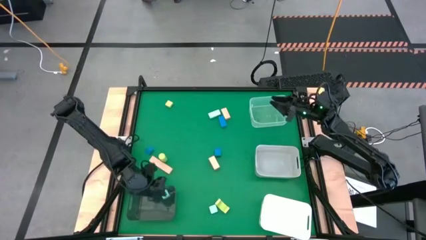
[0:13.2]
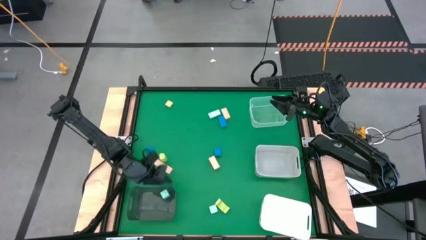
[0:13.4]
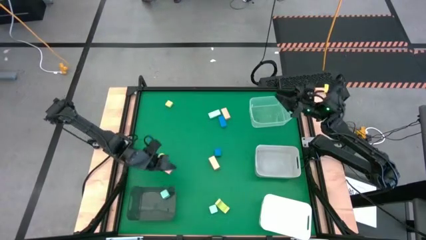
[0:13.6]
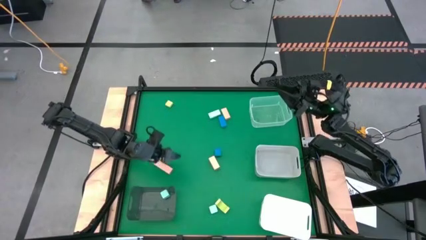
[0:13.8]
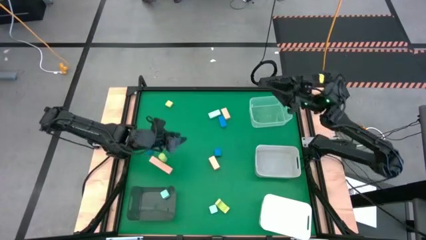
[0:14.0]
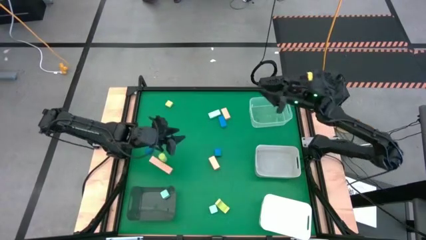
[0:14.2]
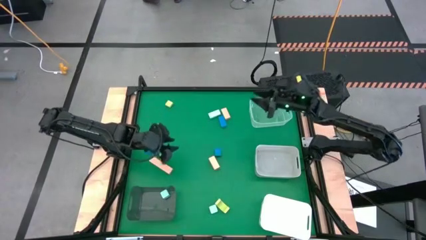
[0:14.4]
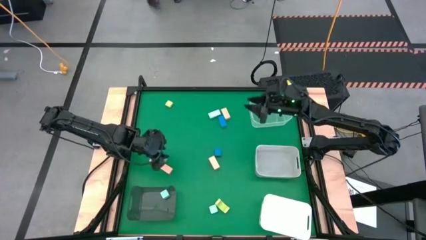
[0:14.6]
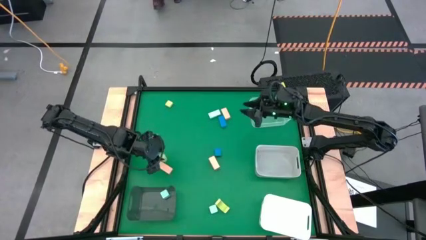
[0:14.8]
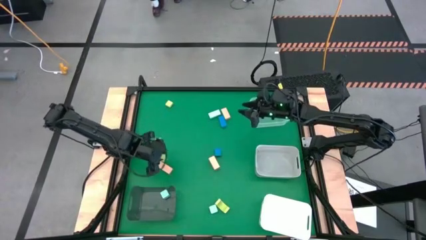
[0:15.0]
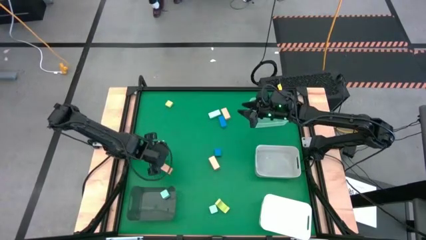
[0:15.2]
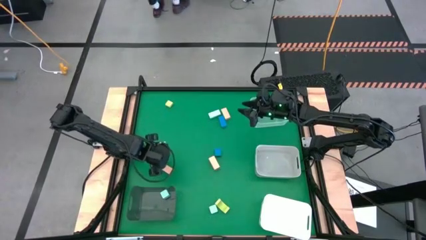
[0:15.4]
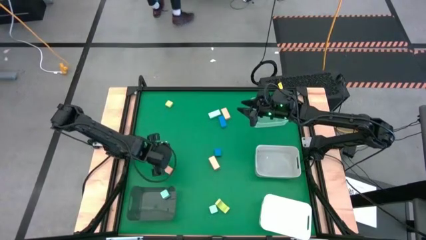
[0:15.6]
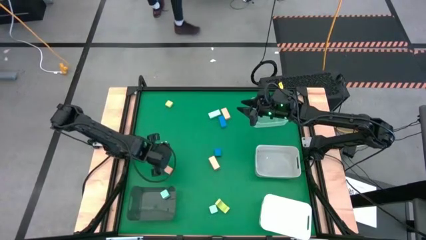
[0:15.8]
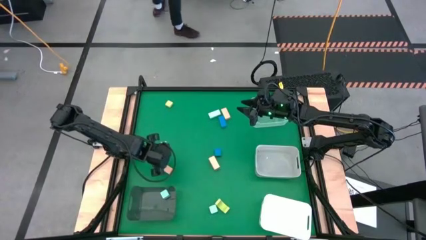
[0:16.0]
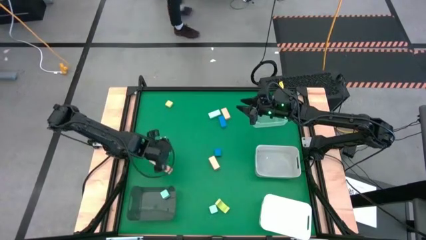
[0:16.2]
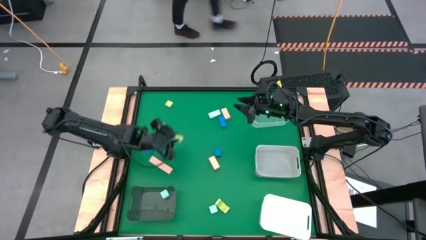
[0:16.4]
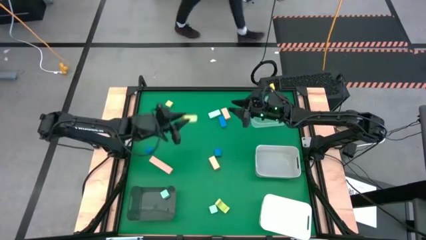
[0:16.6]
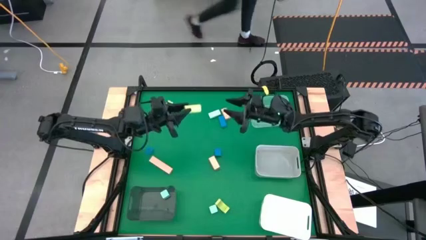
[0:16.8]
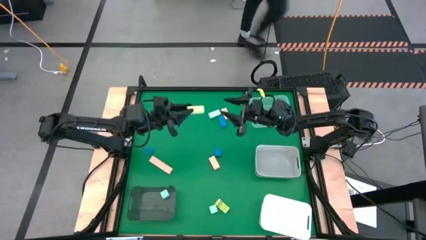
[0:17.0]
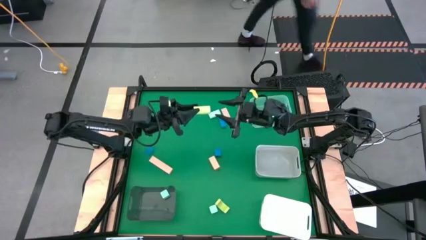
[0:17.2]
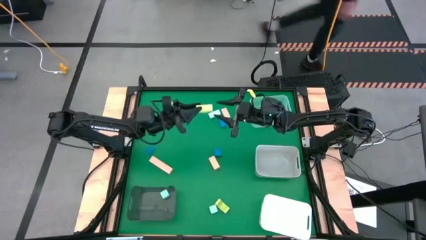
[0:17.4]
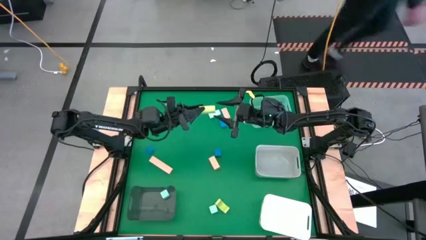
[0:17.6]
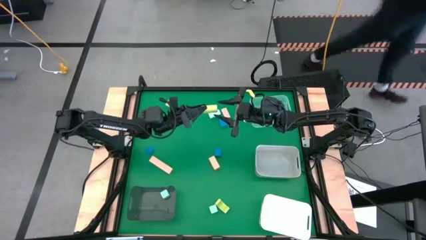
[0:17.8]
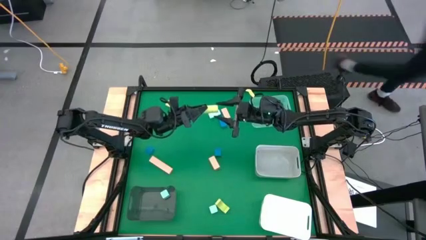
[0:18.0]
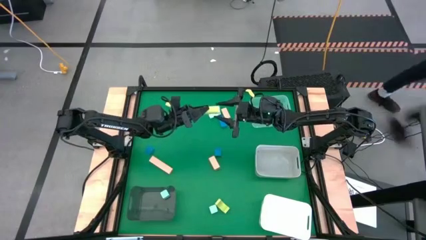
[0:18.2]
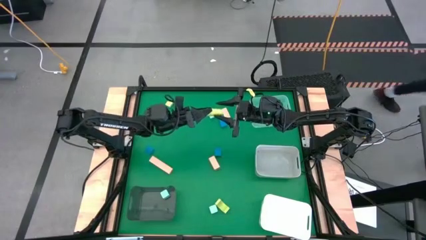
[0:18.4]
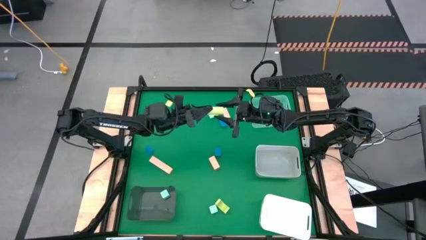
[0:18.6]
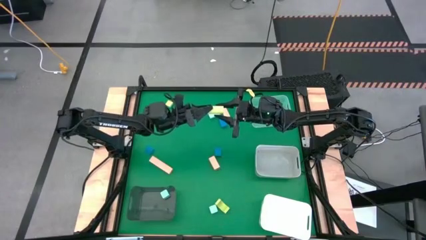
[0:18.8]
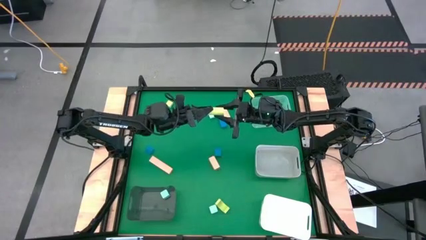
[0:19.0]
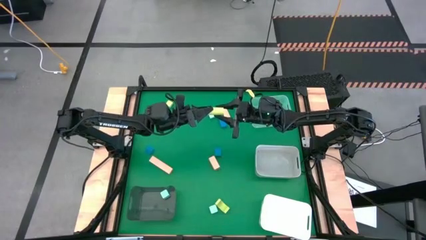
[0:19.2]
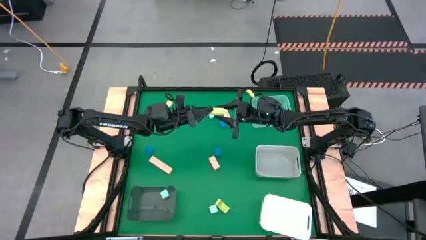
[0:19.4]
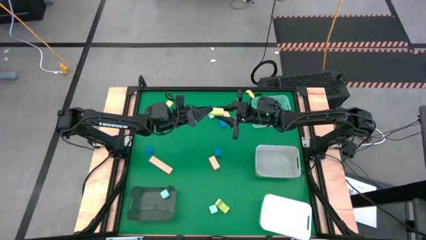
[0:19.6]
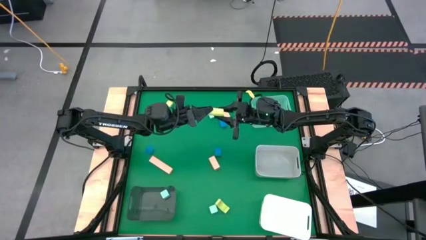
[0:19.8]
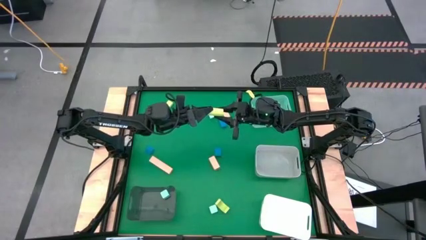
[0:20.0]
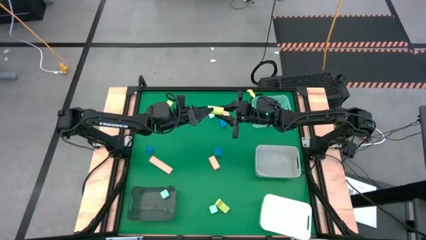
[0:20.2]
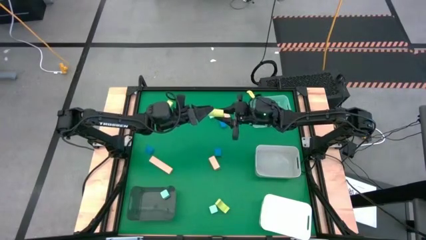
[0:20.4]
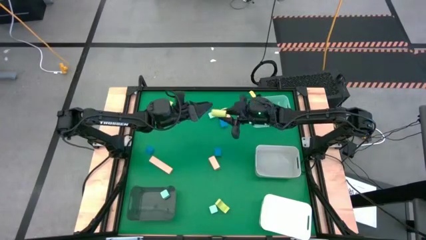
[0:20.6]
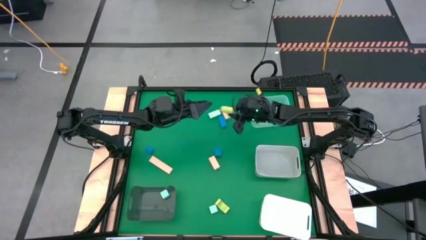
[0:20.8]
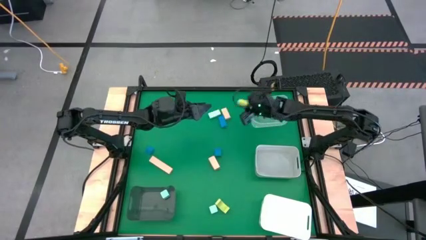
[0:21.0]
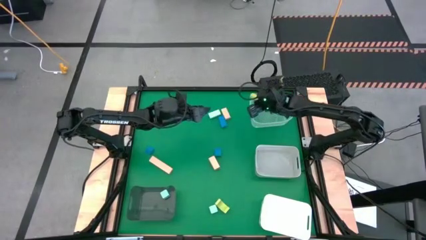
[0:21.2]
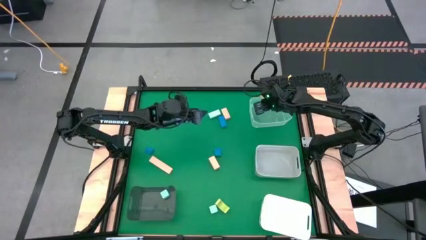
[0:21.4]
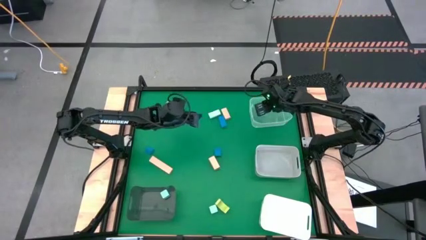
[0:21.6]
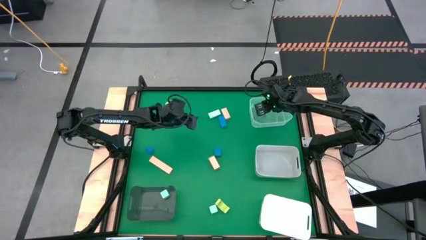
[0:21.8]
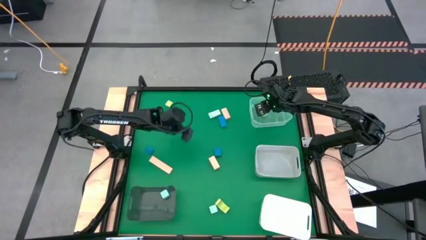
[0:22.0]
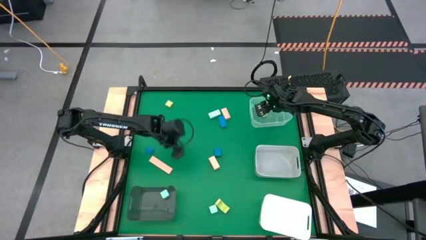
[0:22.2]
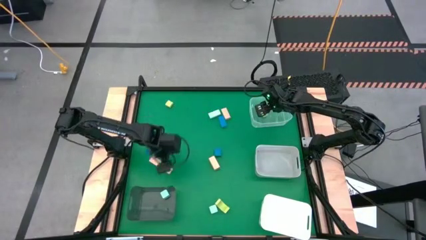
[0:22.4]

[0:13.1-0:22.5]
Task: Sort & place blocks by color
Put the middle left green block into the transparent bin

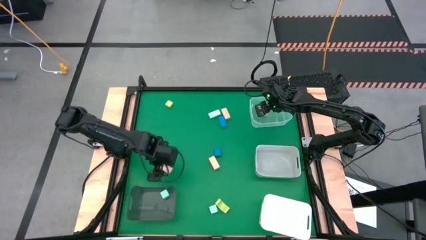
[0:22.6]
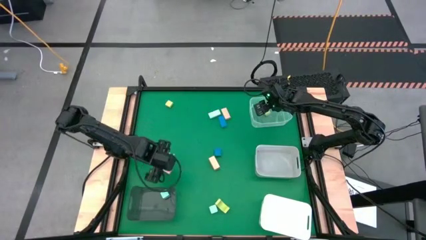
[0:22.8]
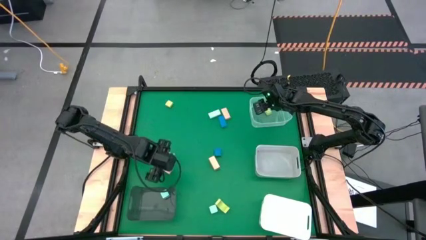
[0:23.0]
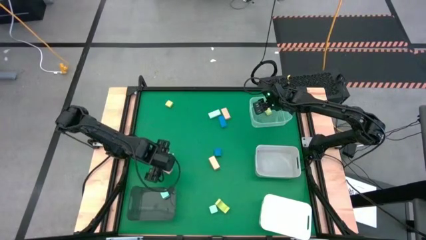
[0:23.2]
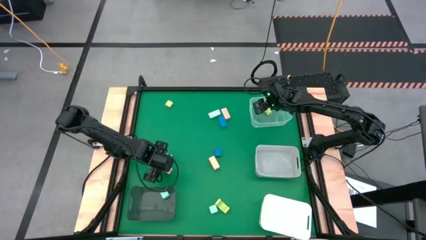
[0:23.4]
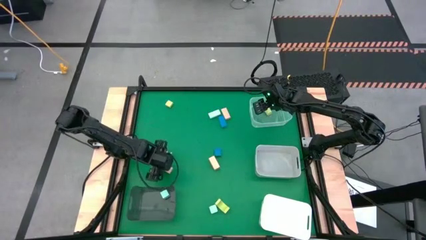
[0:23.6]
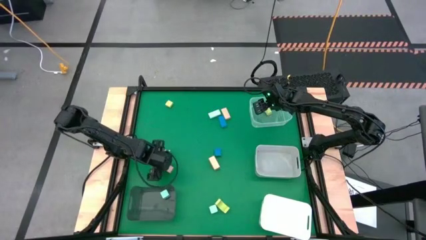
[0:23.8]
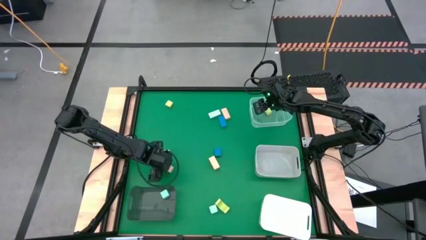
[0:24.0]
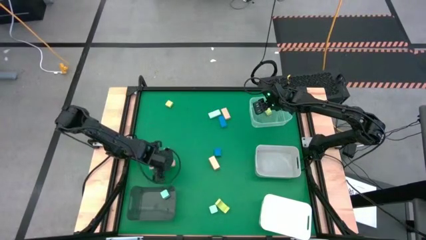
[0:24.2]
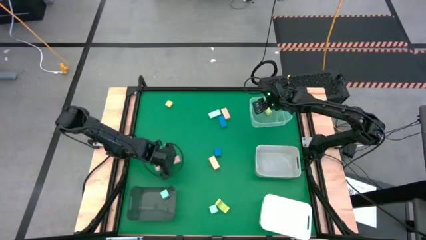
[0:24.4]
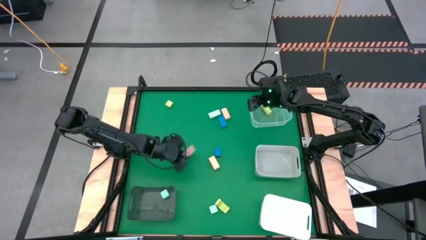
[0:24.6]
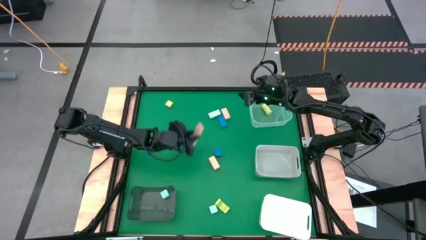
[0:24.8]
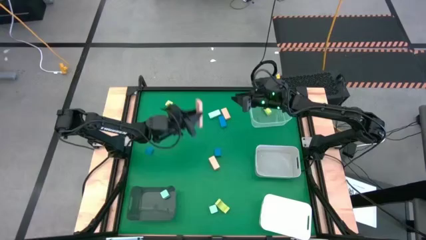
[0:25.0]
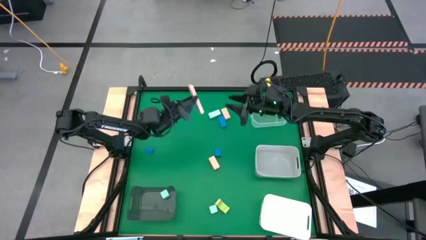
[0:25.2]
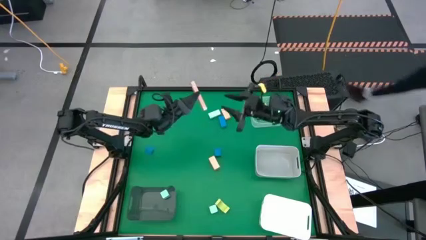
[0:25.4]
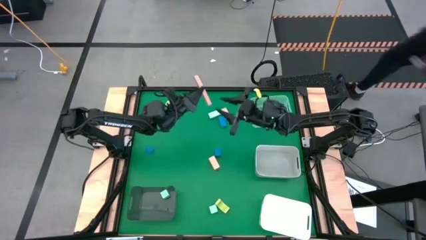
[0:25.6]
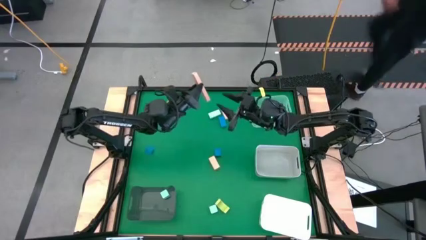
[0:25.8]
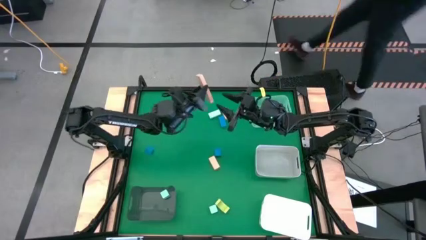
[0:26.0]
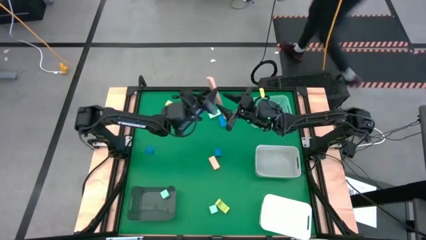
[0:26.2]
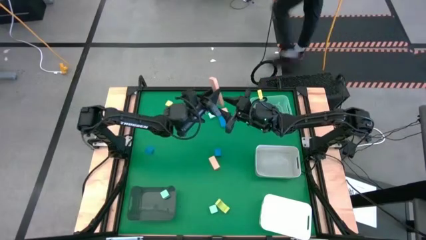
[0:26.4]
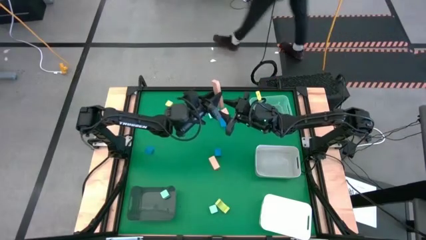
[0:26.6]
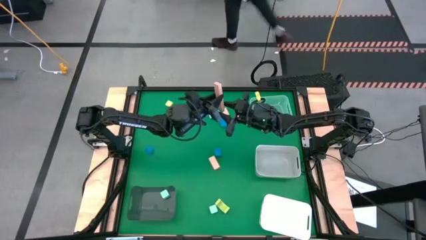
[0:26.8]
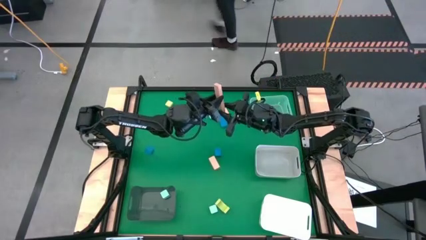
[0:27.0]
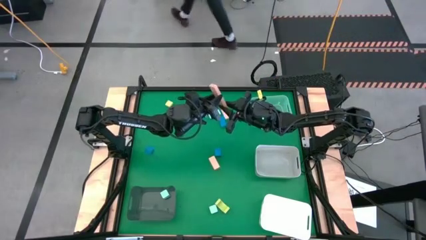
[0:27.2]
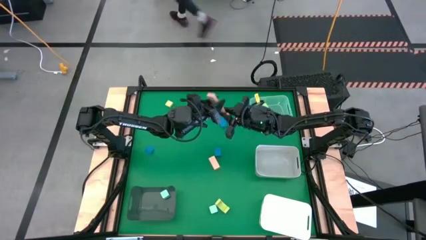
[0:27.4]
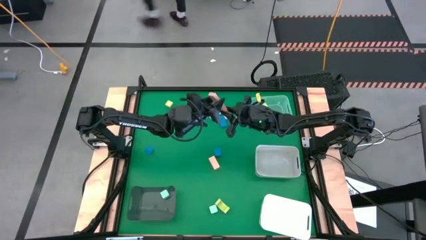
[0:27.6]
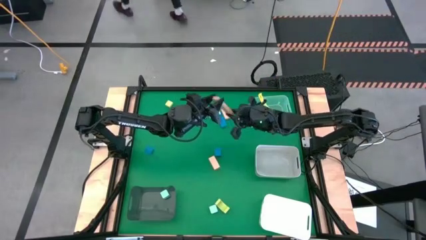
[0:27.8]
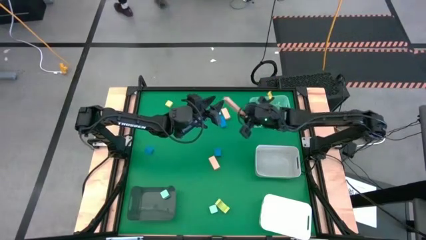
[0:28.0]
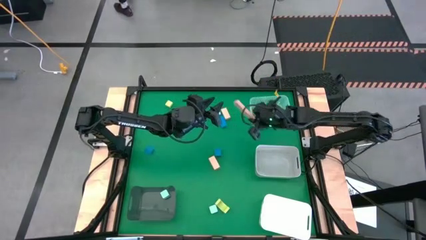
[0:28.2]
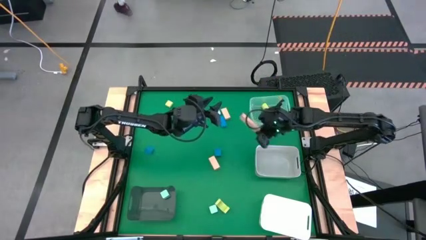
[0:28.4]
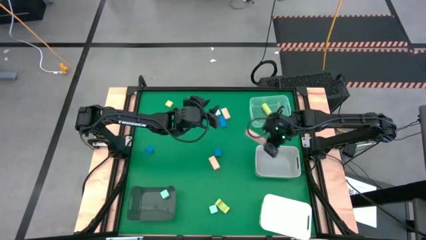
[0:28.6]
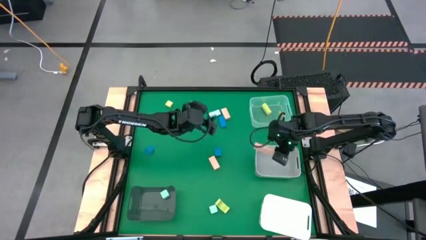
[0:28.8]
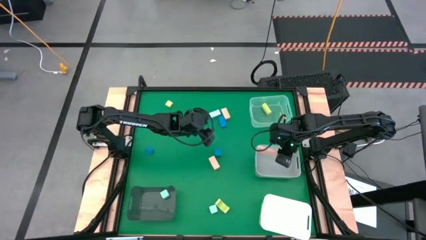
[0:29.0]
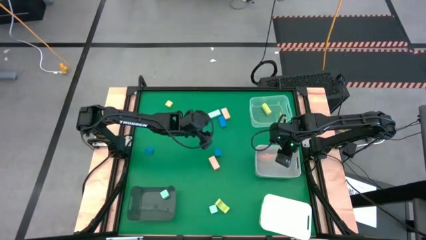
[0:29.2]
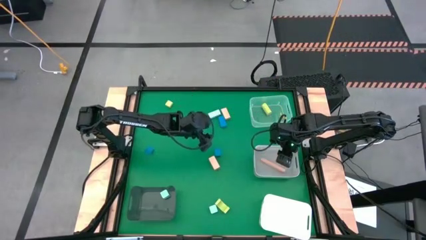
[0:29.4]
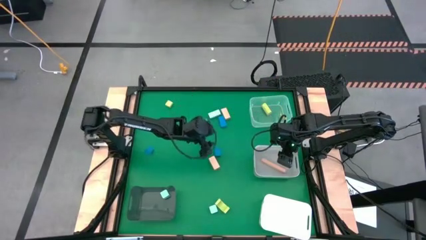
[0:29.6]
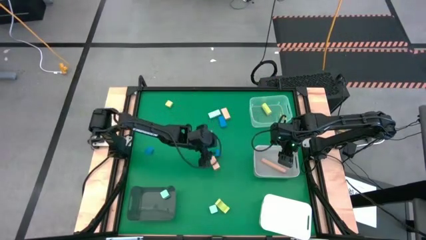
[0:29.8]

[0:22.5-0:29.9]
Put the bottom left pink block into the gray bin
